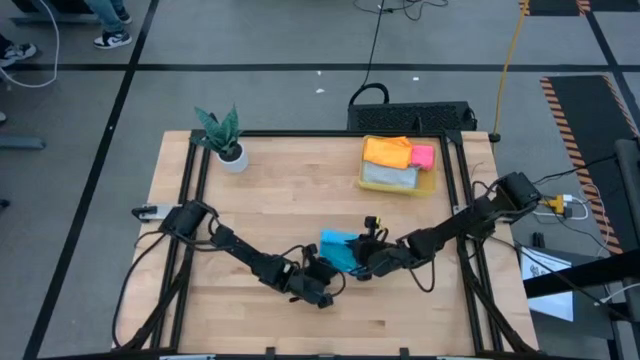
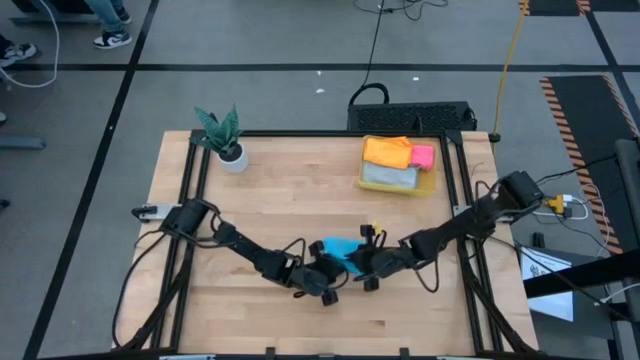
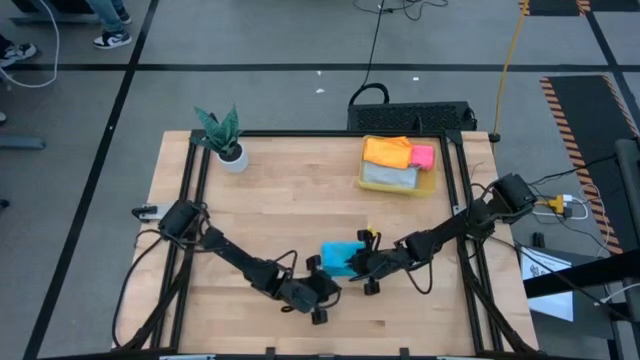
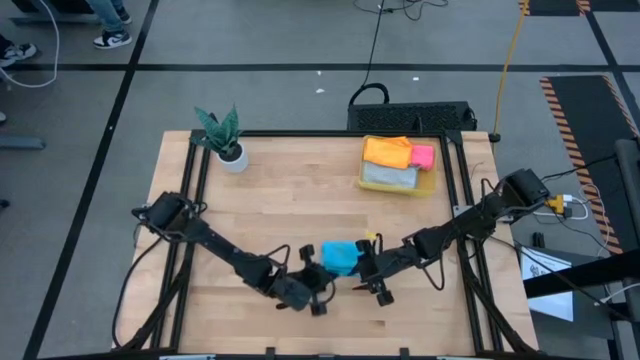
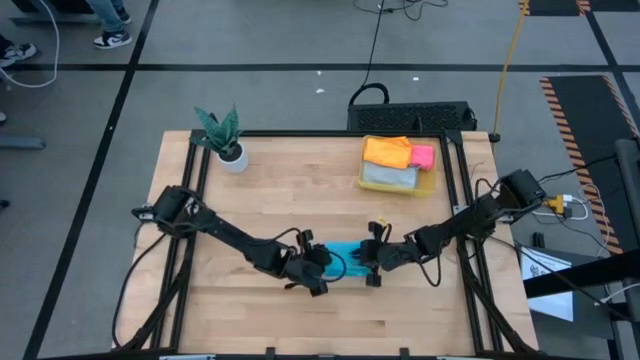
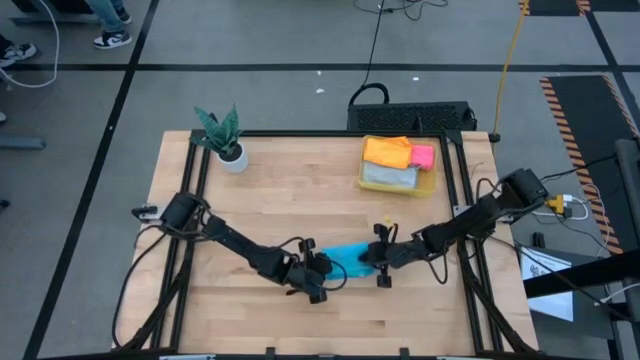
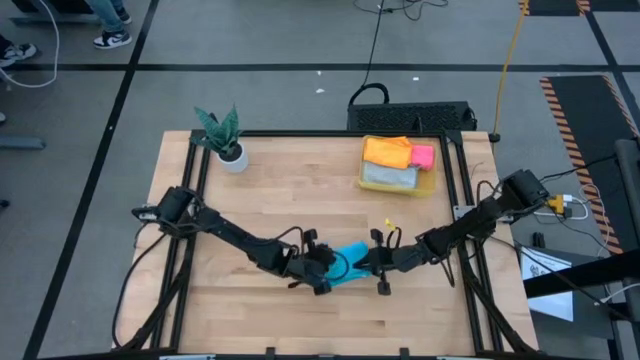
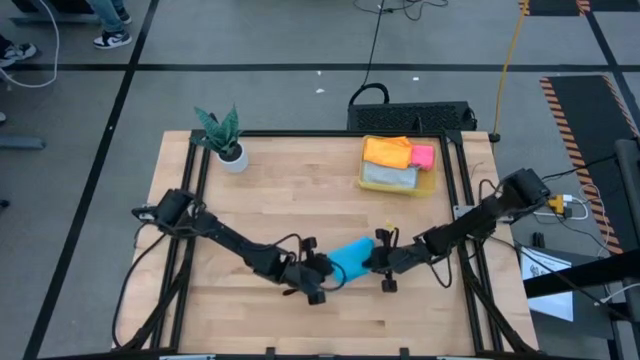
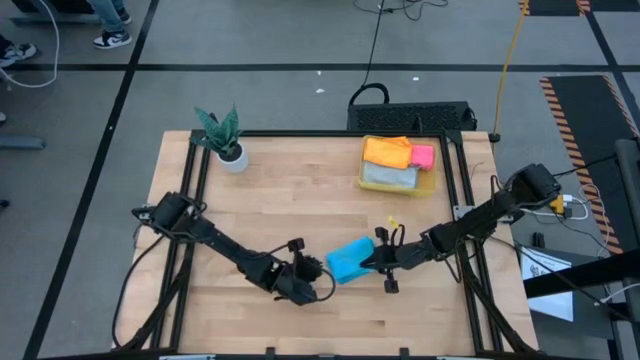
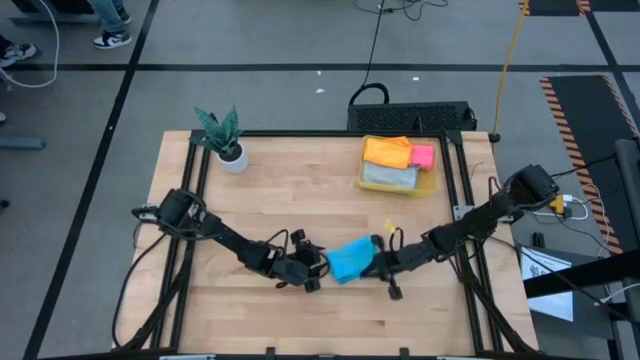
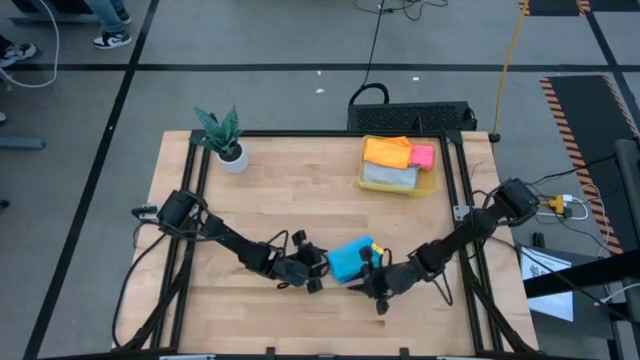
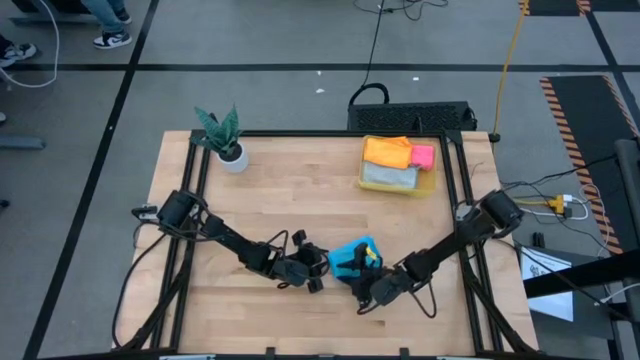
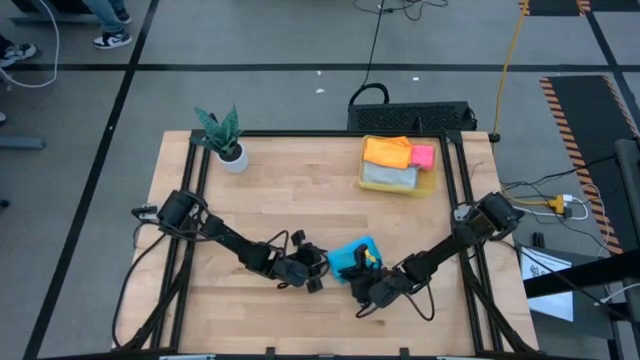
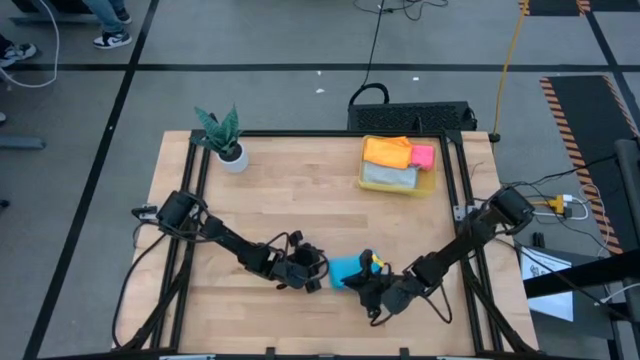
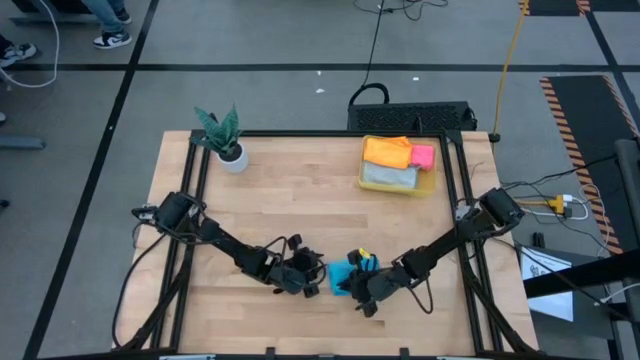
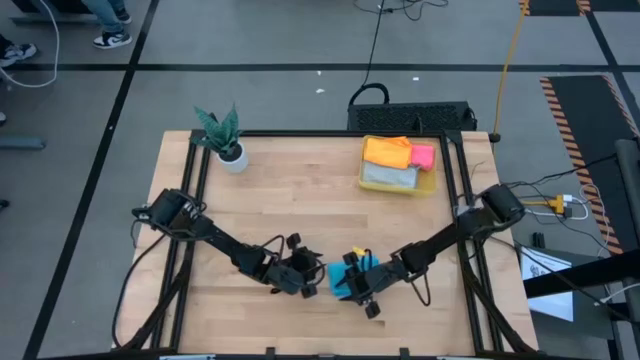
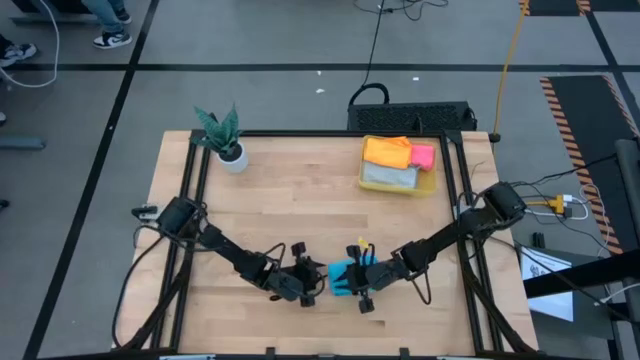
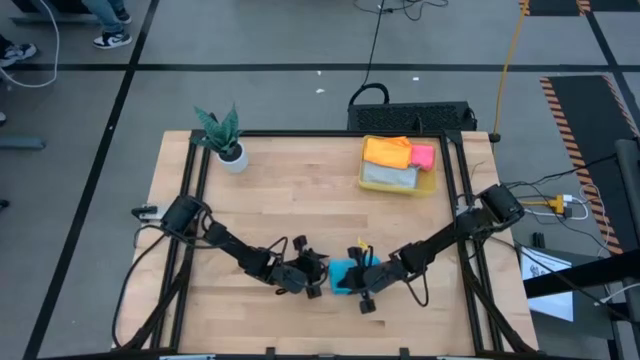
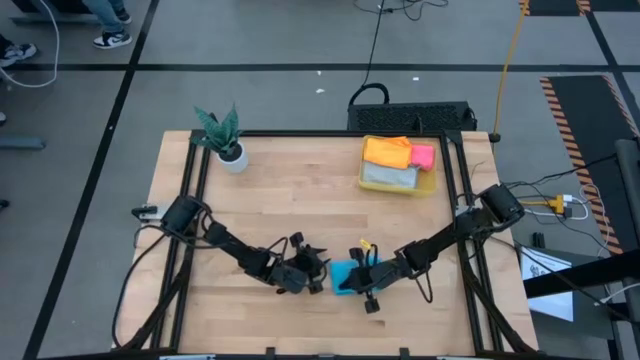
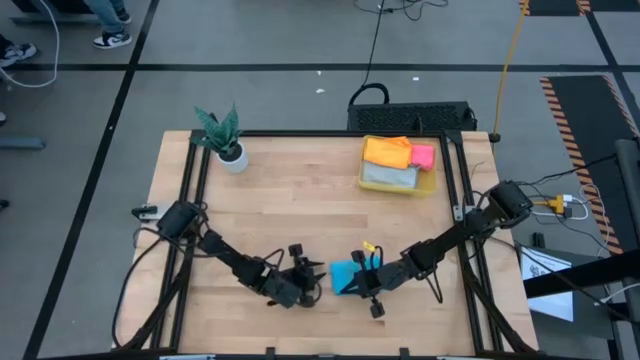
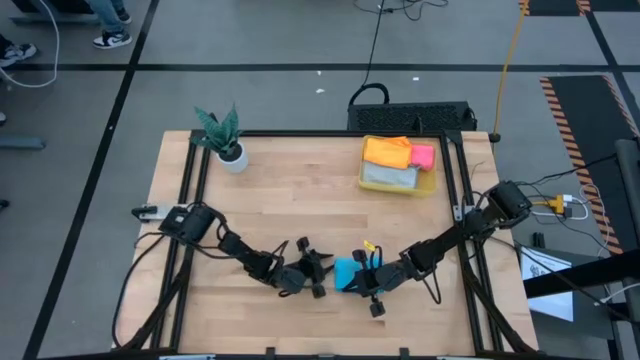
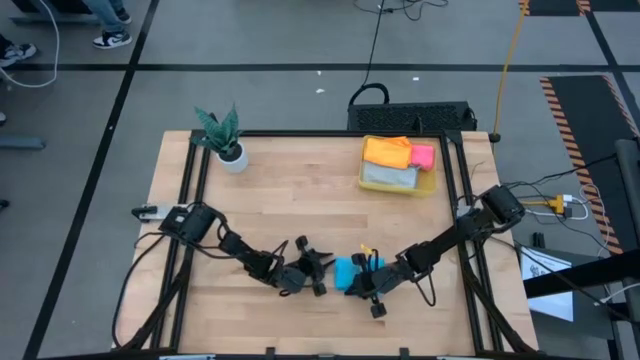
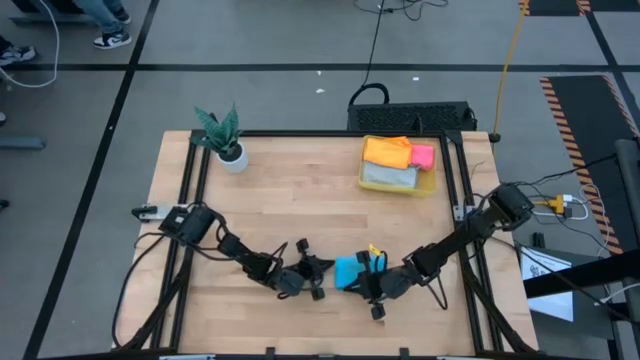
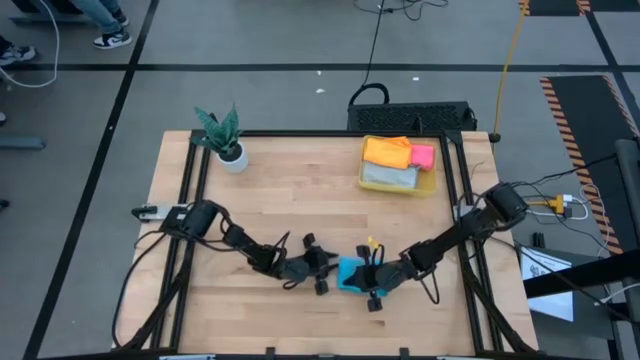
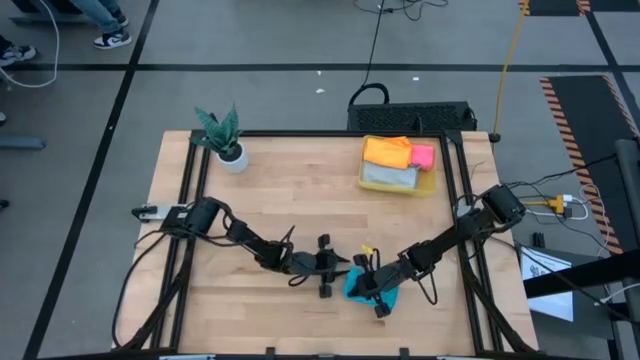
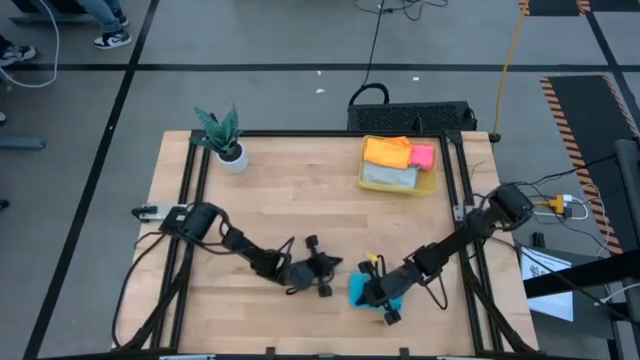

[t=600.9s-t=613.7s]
Task: Fold microfiber towels
Fold the blue kitchen towel

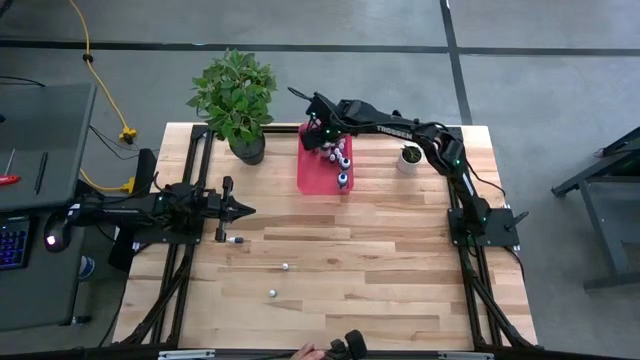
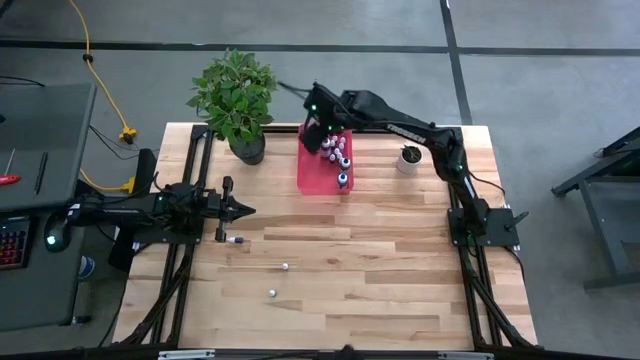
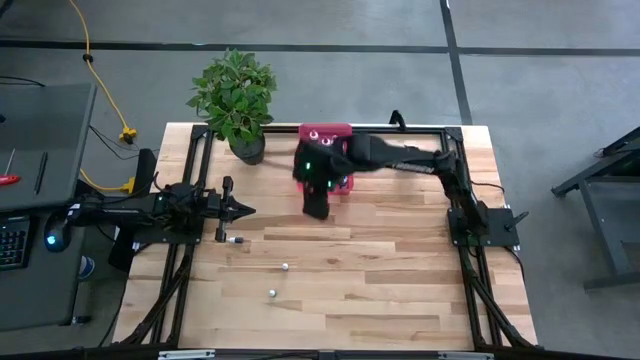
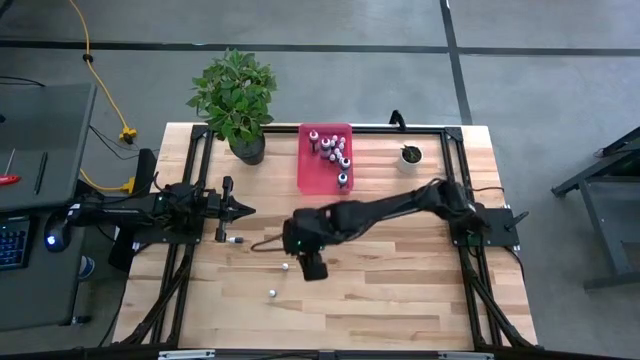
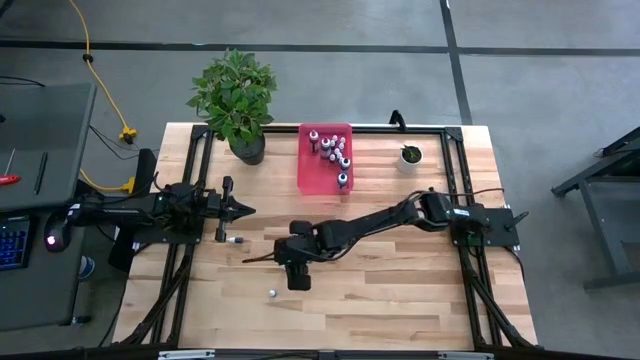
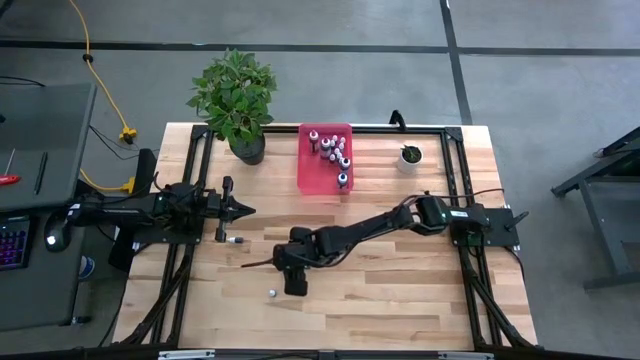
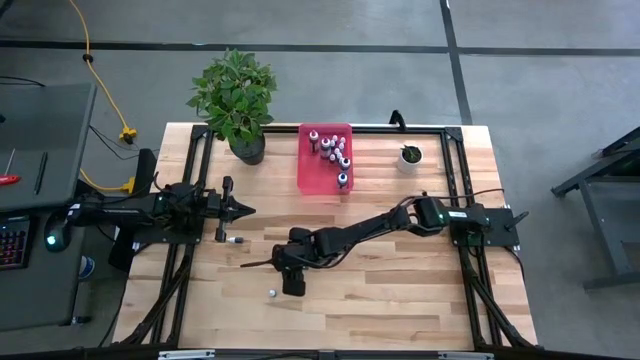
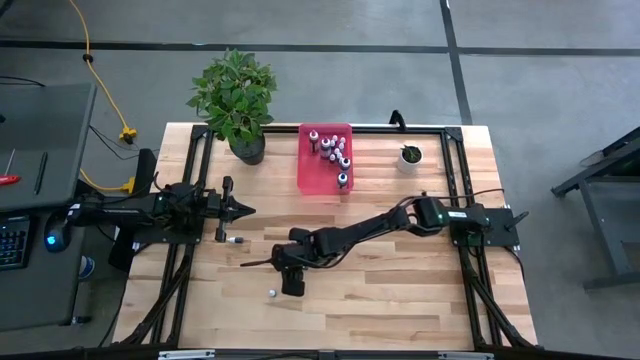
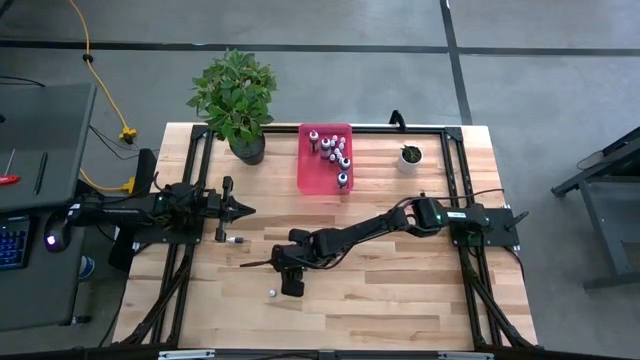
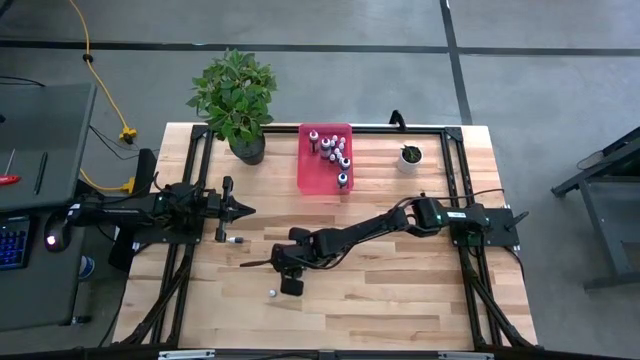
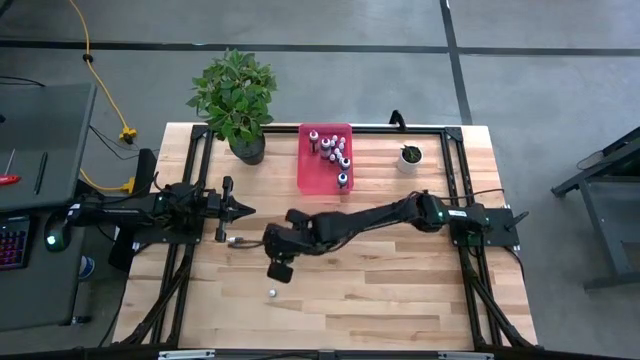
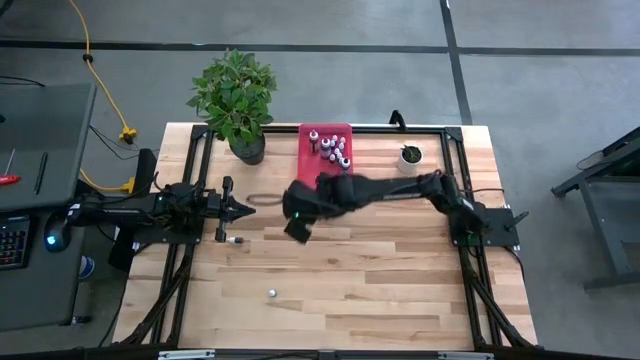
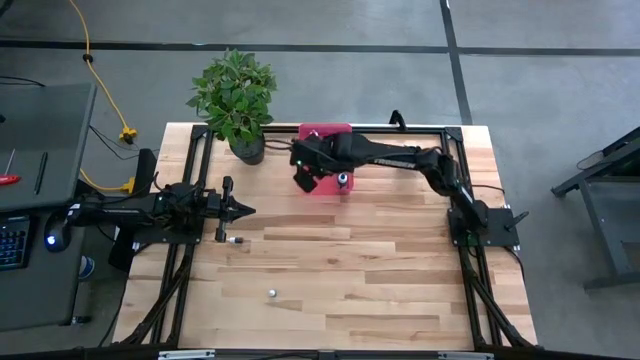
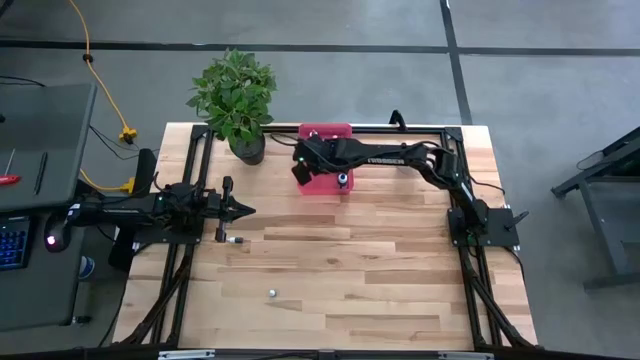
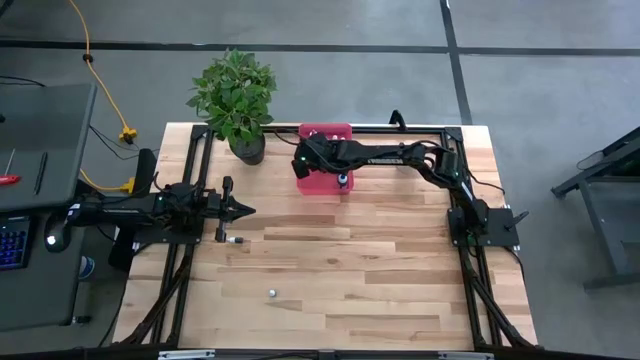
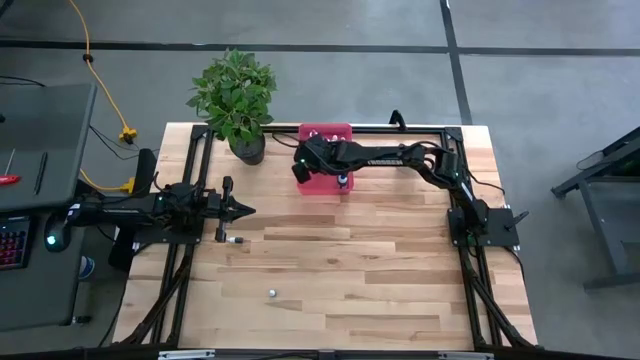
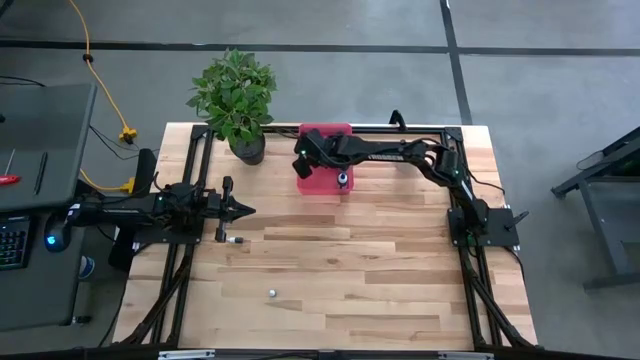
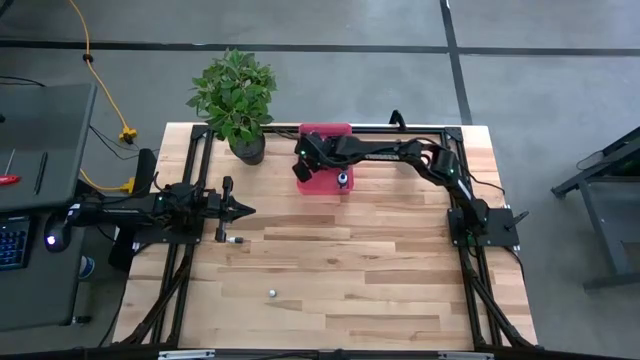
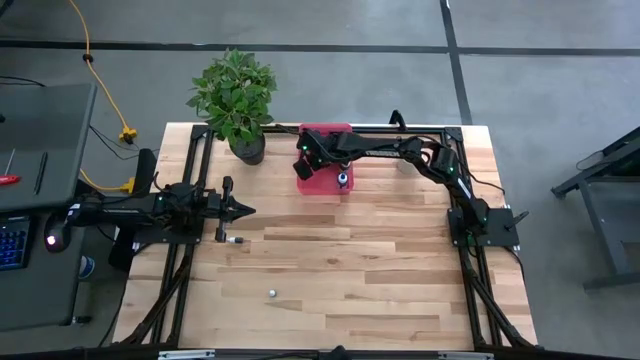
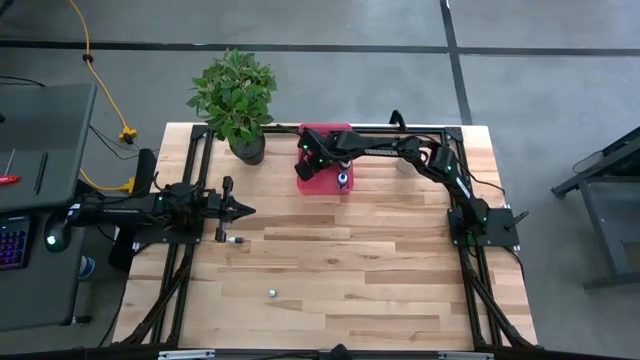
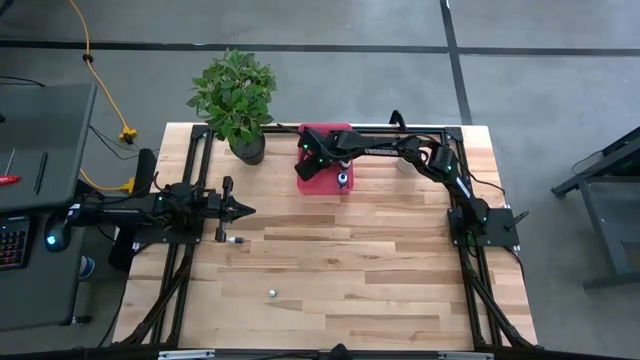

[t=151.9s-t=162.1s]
Task: Pick & Place food coloring
Put the green food coloring bottle into the pink bin
